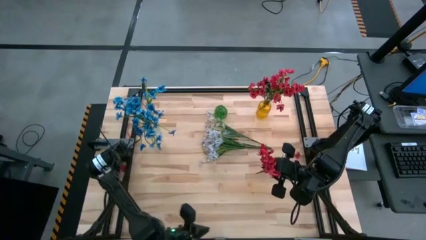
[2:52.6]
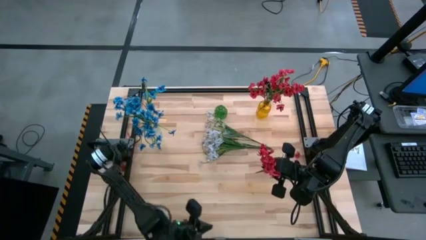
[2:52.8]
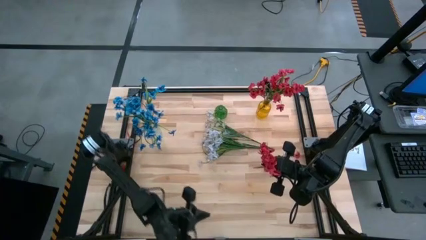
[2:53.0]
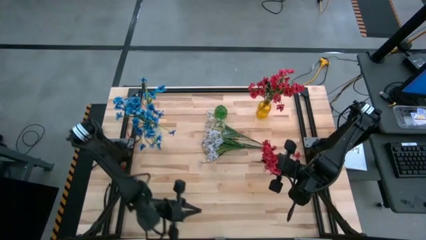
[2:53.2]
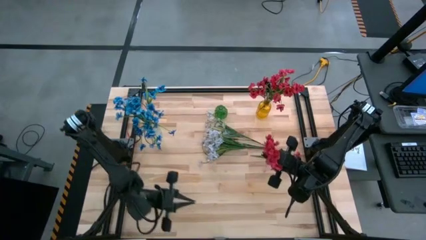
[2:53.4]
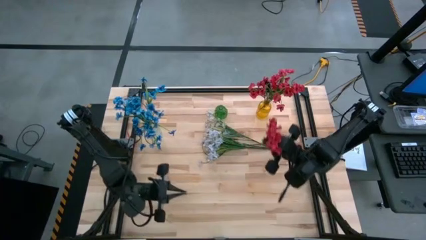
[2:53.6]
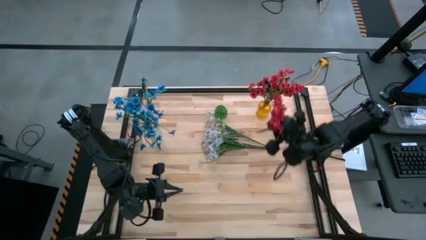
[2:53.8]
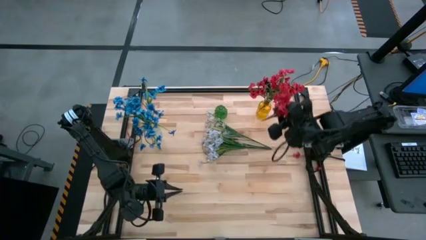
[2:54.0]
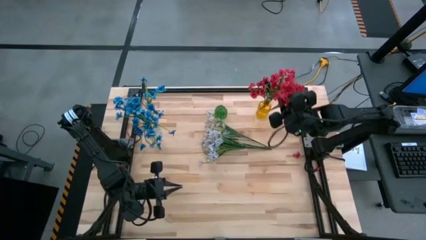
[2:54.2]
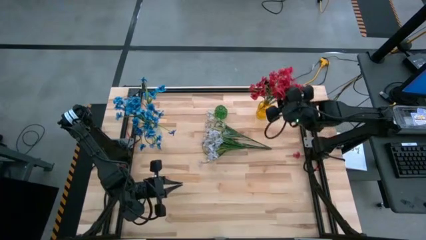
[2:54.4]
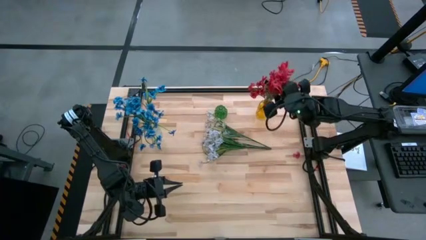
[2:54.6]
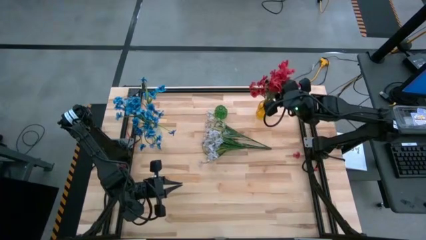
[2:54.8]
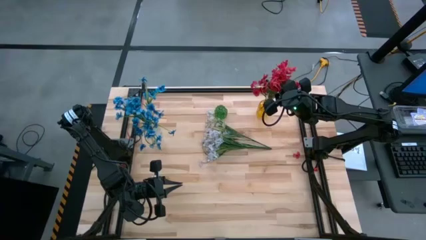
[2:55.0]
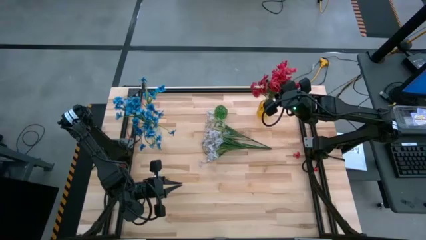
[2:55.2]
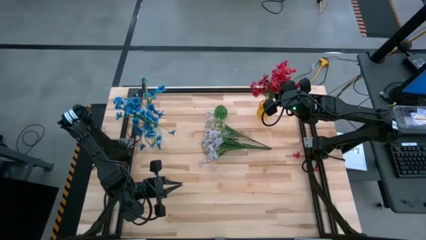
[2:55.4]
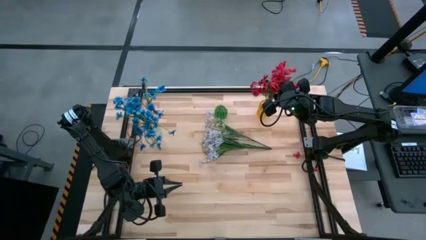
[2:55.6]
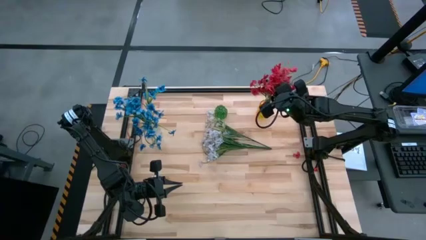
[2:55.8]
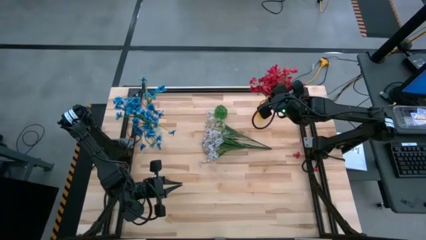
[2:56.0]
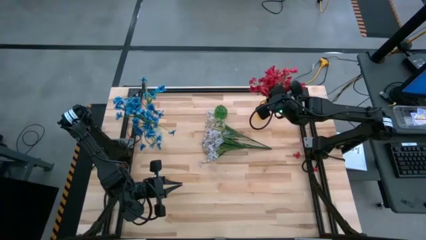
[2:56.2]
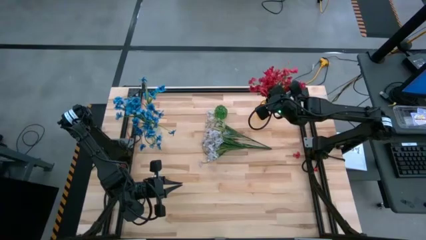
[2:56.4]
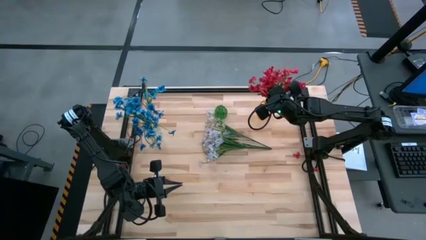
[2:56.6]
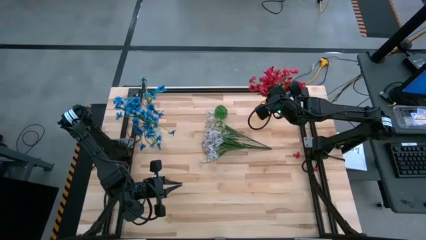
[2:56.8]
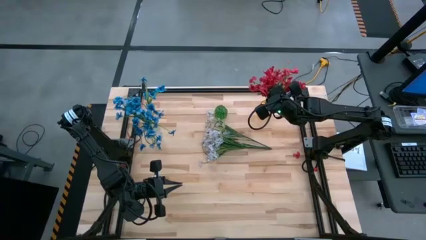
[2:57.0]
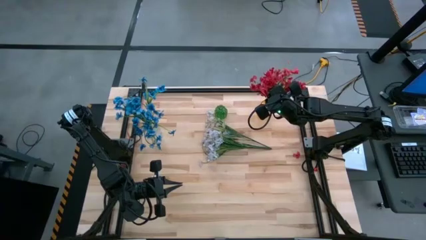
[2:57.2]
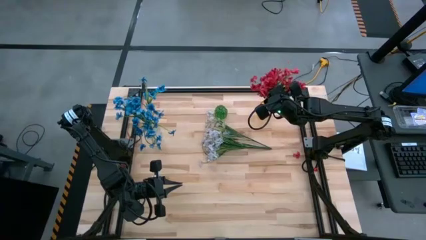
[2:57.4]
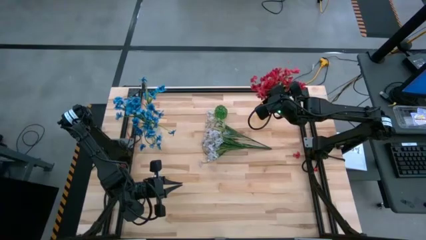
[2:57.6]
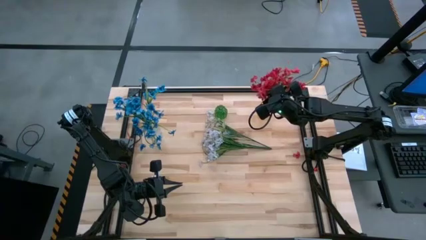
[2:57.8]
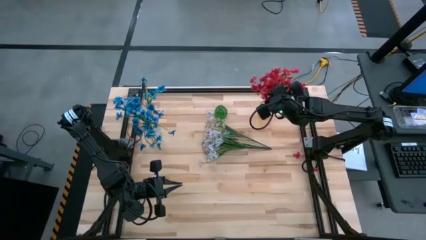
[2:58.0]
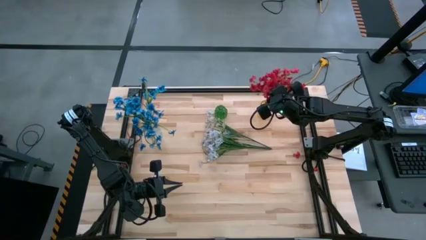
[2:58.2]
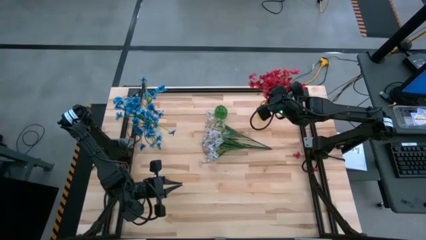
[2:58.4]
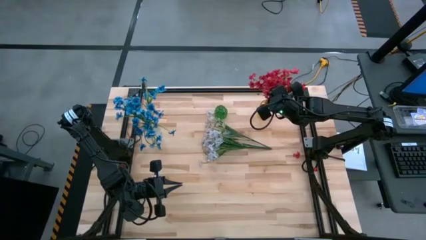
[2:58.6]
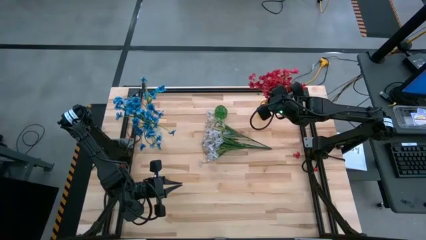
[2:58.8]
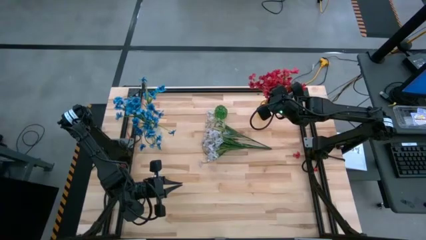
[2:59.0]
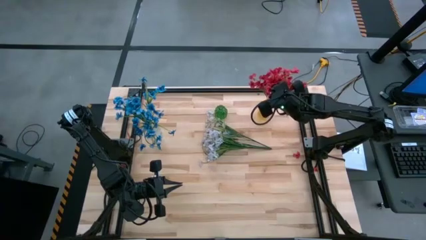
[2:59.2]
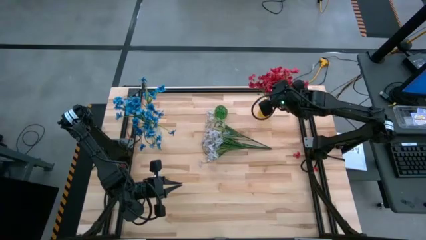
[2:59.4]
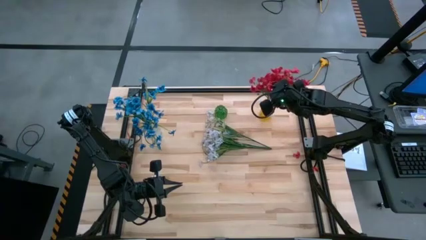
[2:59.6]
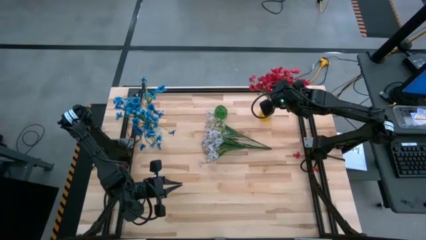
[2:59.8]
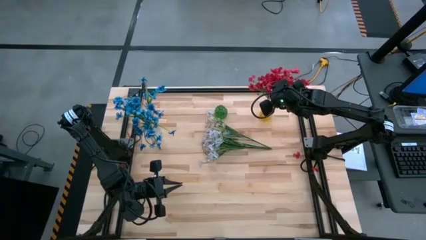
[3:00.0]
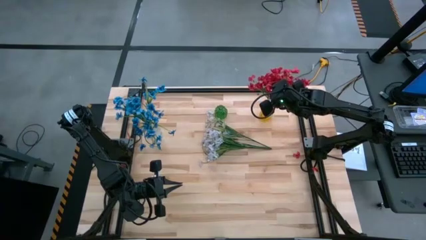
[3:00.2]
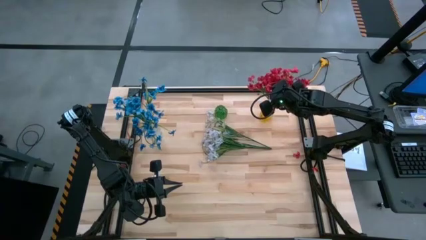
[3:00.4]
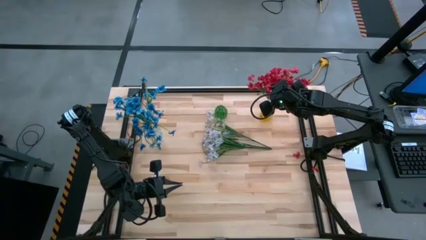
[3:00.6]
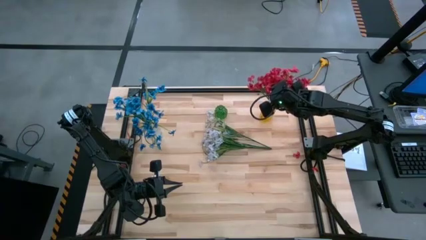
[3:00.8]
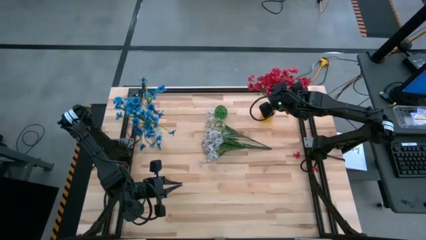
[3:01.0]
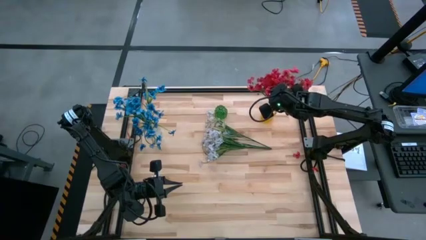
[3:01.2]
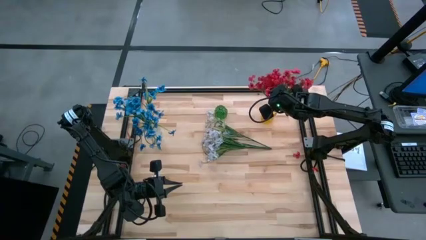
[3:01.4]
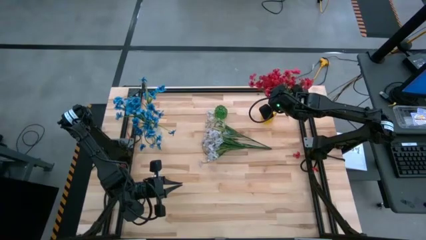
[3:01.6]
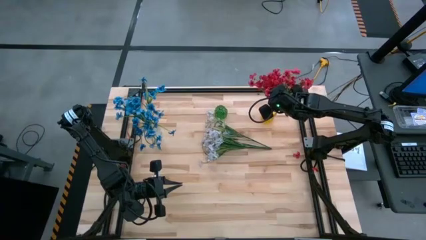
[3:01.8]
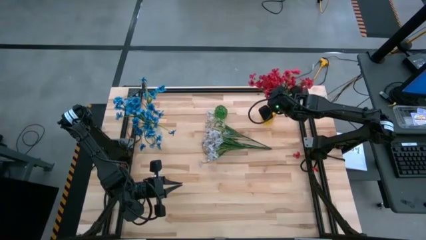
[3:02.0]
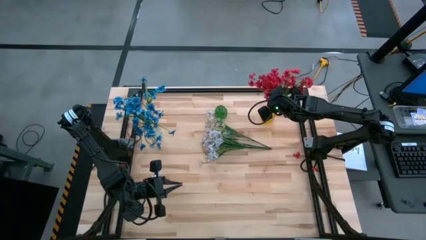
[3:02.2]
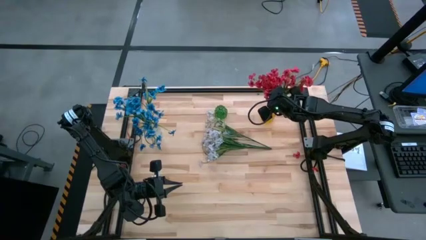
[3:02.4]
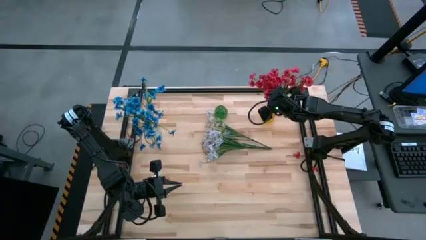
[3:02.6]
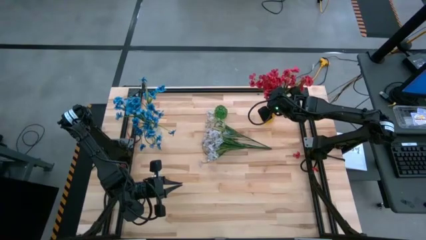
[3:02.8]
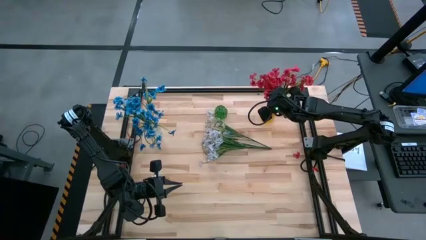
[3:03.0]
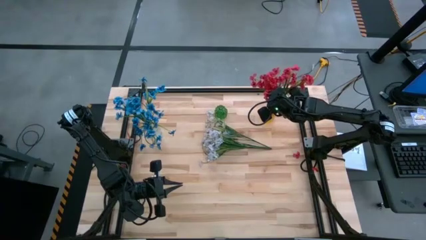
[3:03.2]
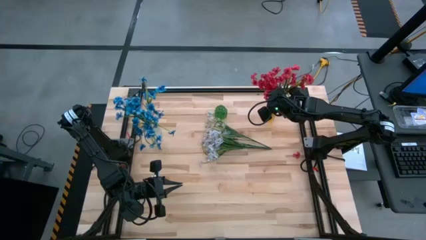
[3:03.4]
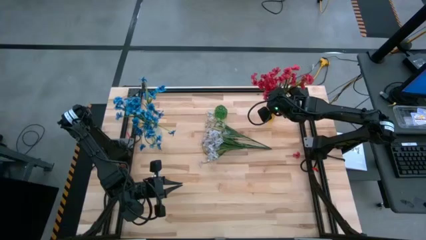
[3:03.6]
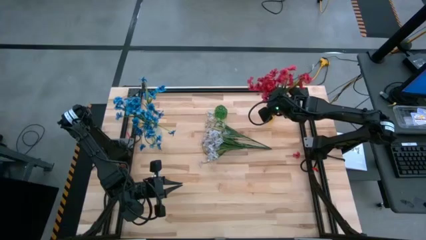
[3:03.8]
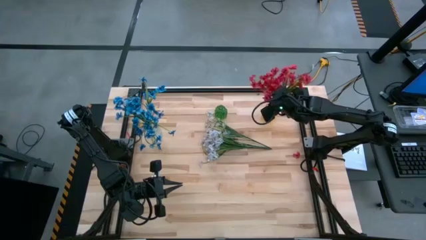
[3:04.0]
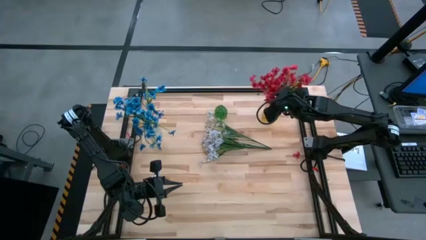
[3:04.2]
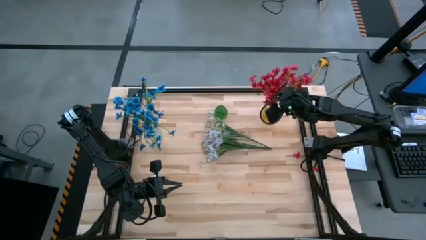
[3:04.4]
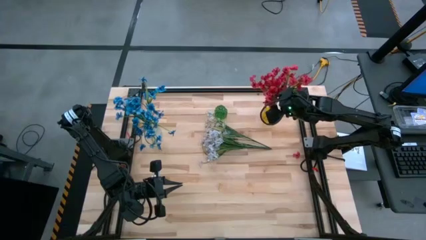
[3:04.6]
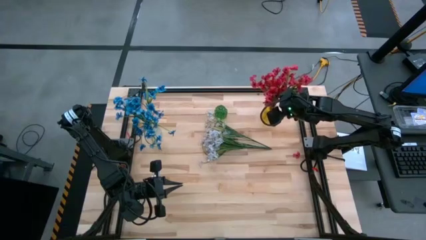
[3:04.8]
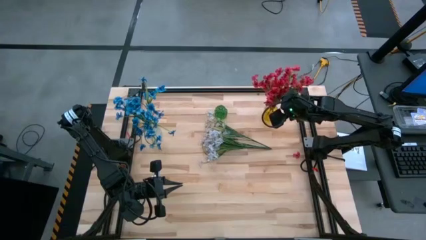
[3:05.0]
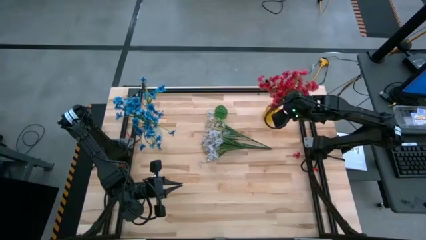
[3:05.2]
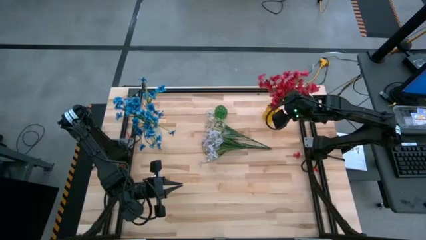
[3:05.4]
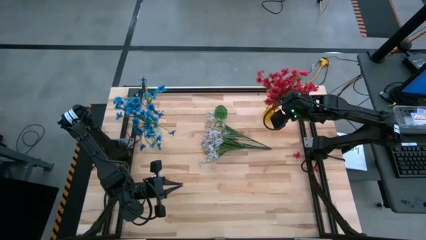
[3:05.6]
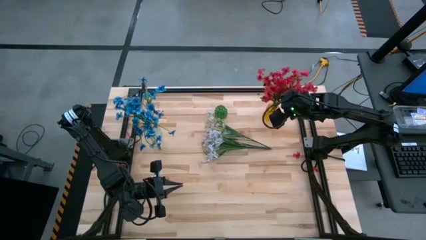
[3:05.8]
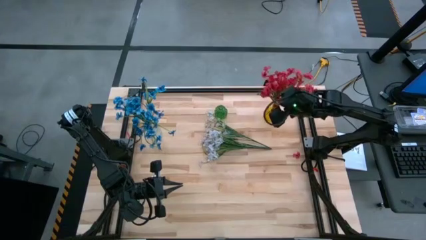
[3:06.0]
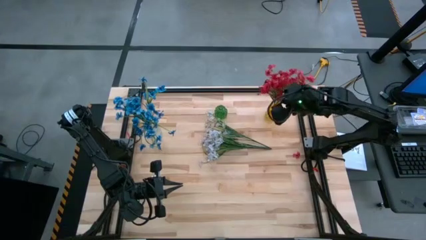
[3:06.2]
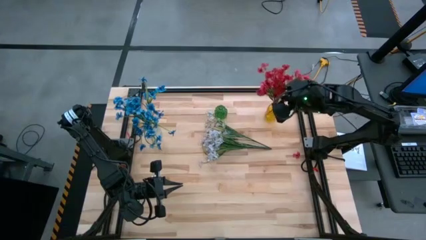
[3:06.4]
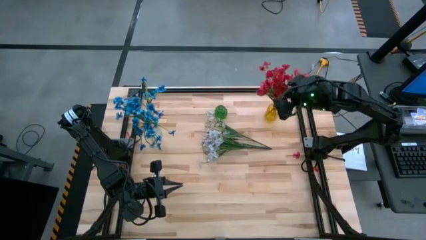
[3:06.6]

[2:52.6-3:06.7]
Task: Sort flowers into vase by color
Put the red flowers into the yellow vase
